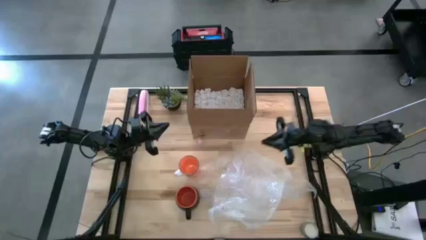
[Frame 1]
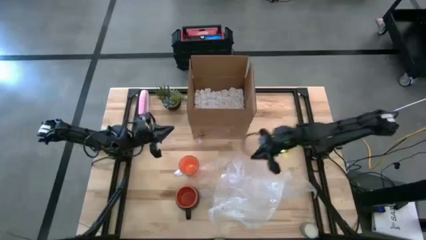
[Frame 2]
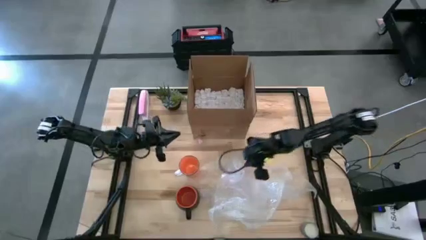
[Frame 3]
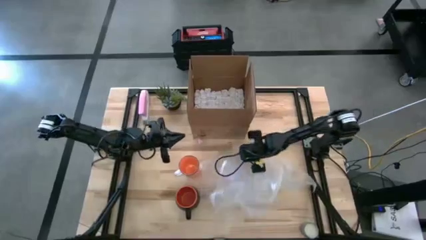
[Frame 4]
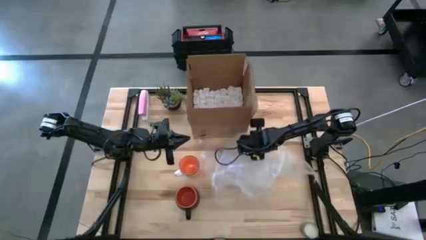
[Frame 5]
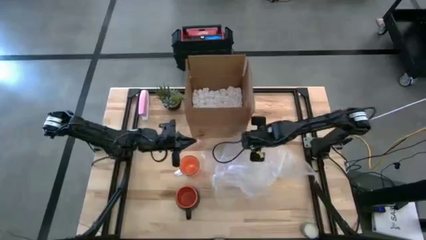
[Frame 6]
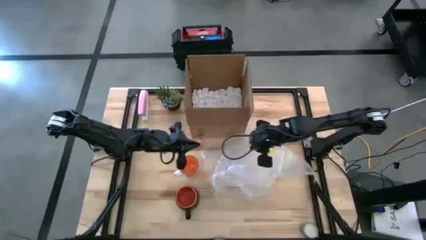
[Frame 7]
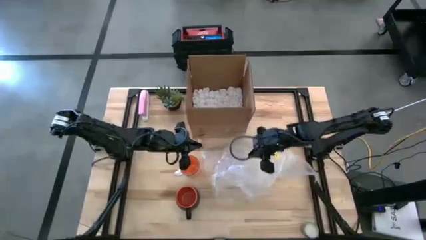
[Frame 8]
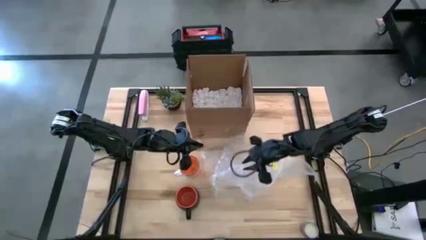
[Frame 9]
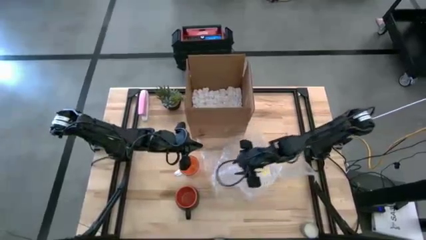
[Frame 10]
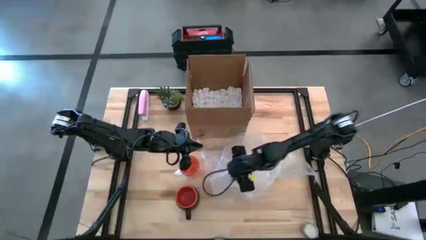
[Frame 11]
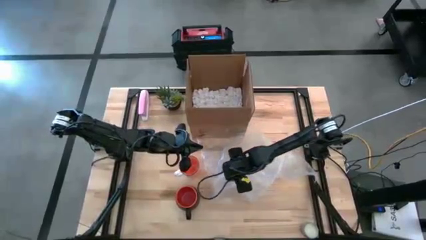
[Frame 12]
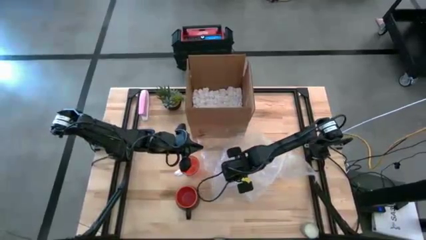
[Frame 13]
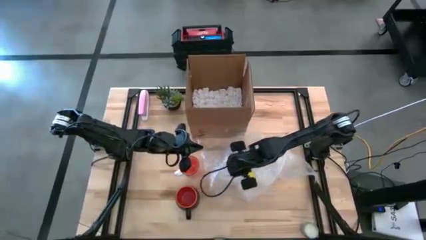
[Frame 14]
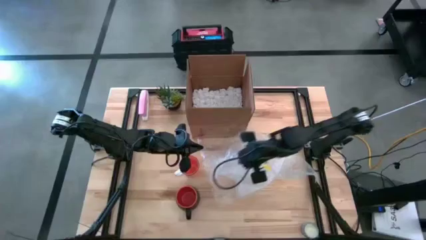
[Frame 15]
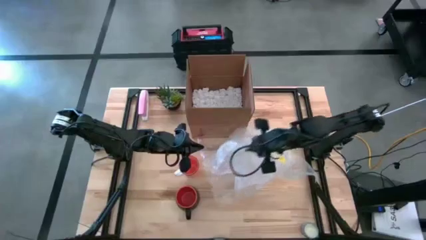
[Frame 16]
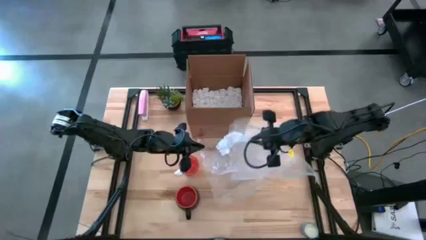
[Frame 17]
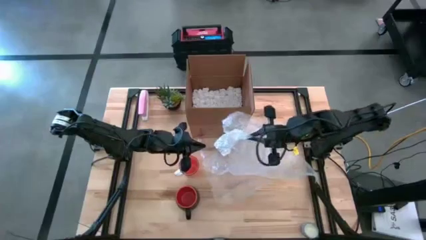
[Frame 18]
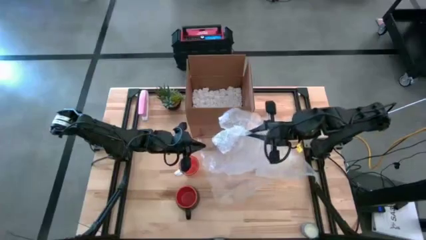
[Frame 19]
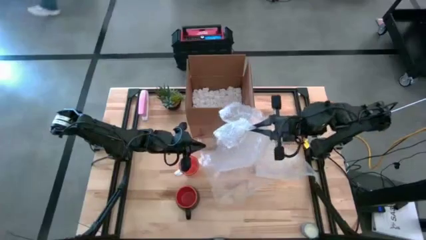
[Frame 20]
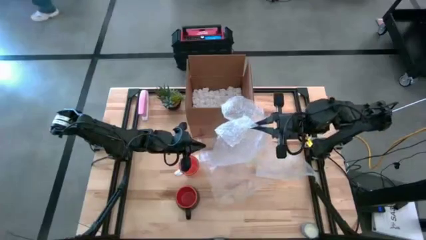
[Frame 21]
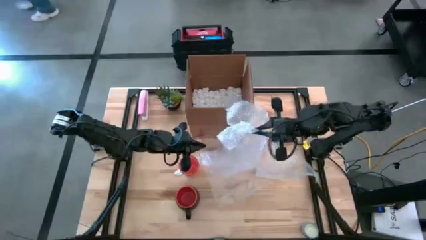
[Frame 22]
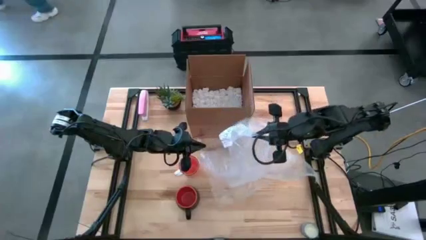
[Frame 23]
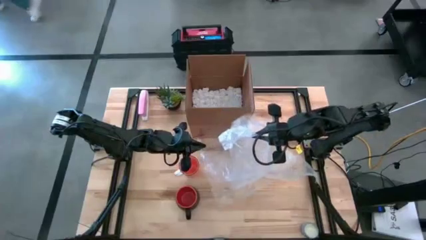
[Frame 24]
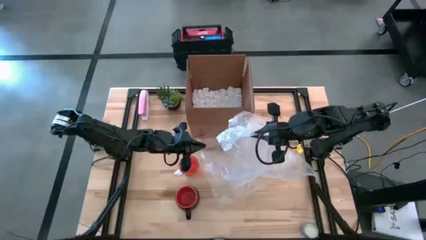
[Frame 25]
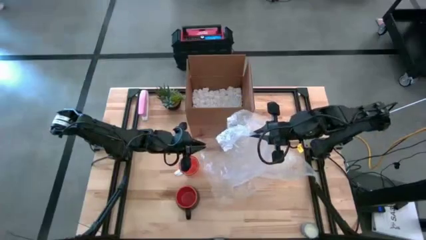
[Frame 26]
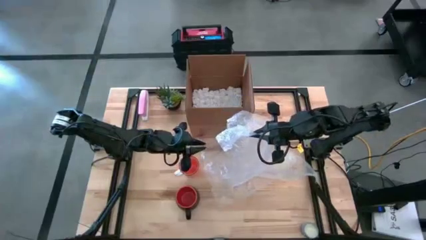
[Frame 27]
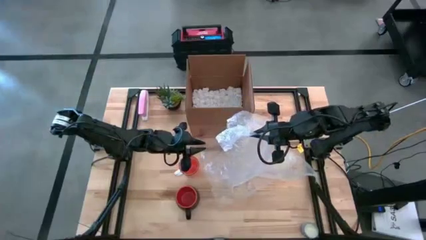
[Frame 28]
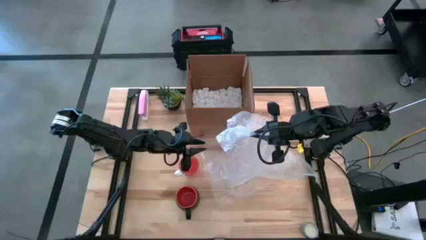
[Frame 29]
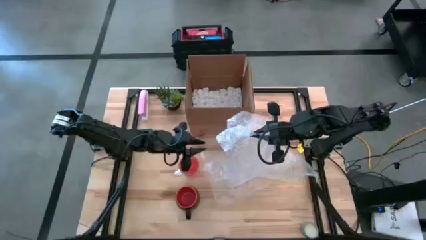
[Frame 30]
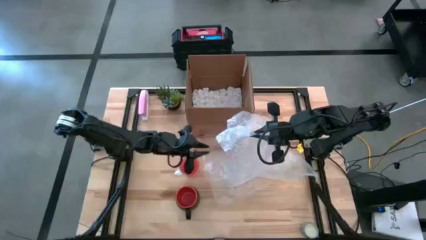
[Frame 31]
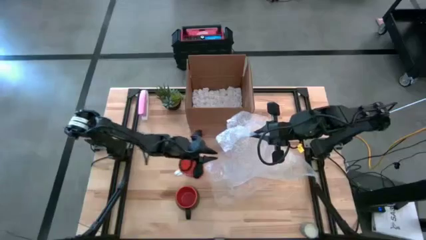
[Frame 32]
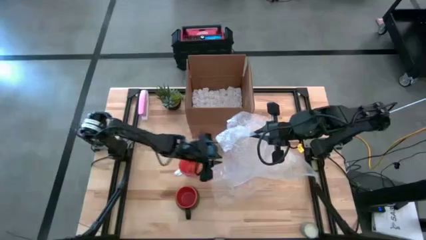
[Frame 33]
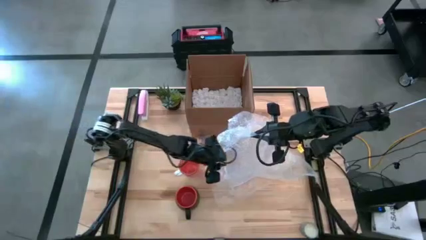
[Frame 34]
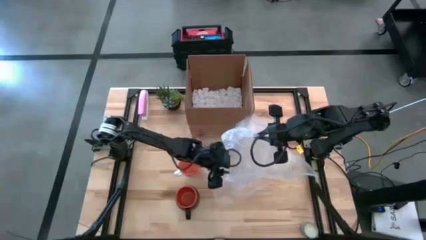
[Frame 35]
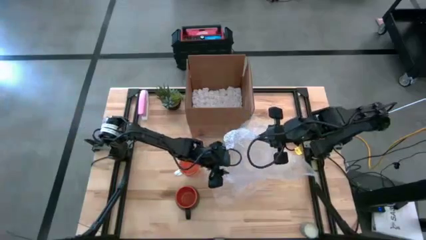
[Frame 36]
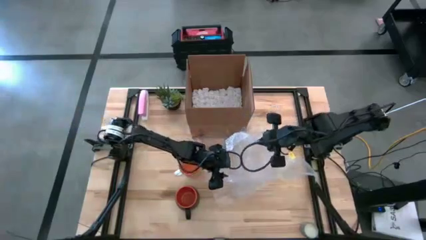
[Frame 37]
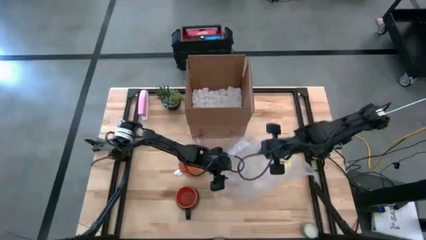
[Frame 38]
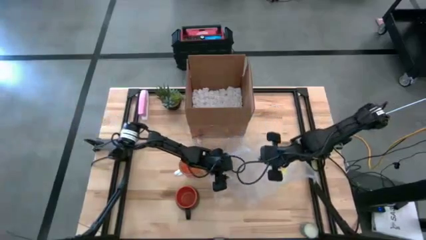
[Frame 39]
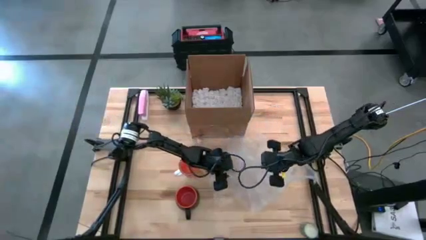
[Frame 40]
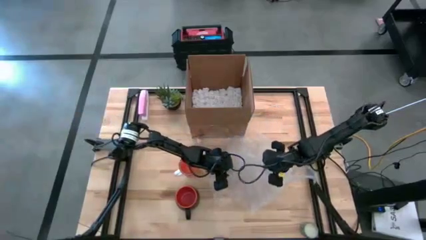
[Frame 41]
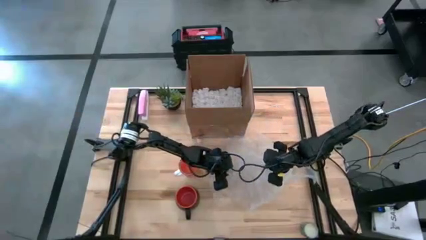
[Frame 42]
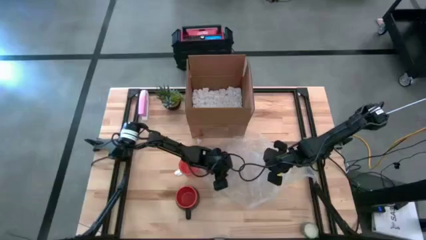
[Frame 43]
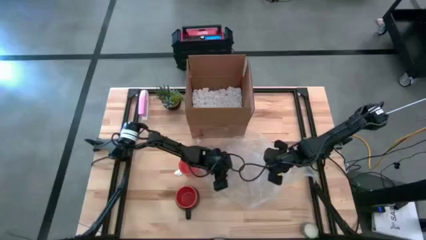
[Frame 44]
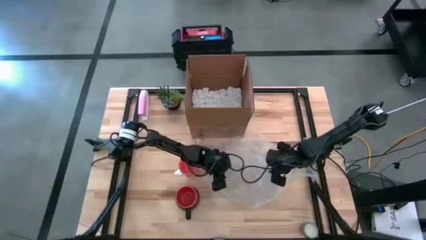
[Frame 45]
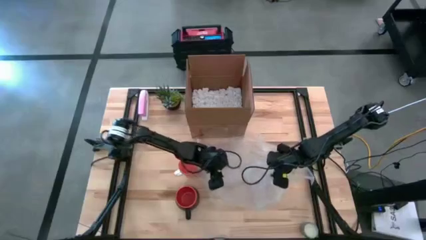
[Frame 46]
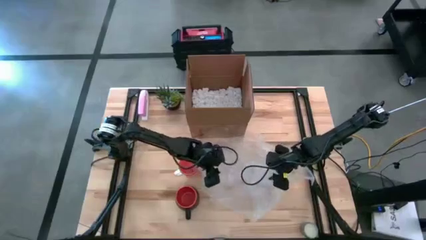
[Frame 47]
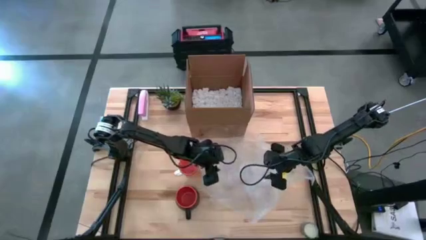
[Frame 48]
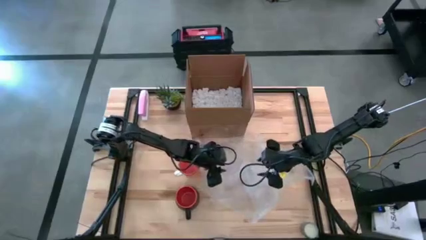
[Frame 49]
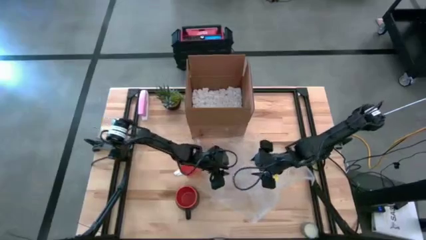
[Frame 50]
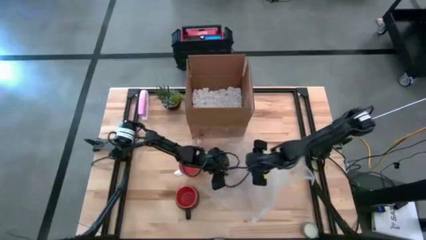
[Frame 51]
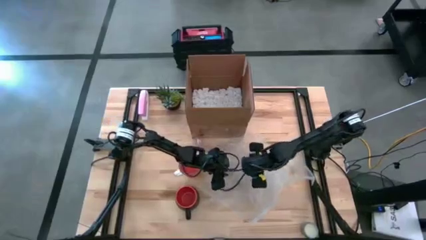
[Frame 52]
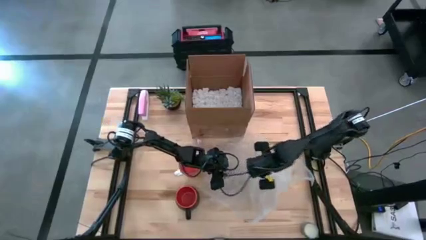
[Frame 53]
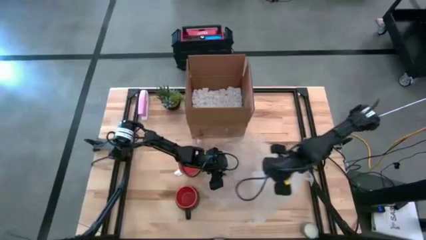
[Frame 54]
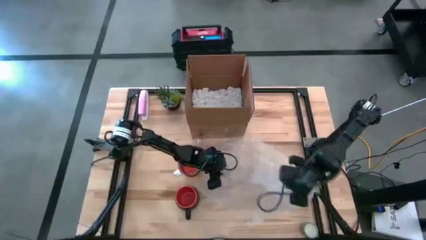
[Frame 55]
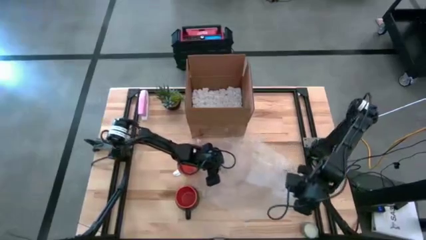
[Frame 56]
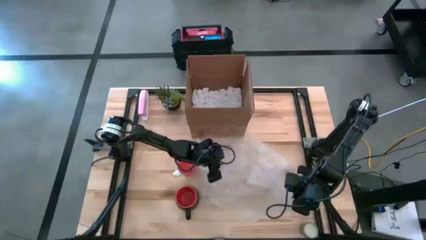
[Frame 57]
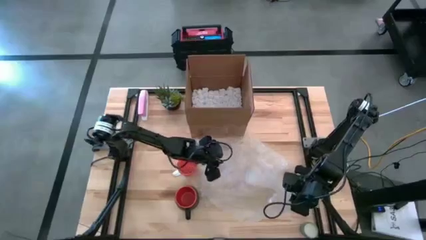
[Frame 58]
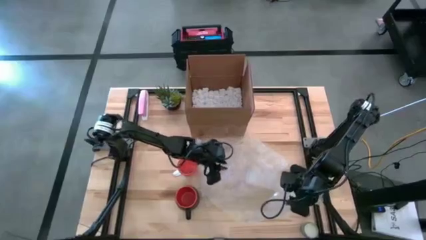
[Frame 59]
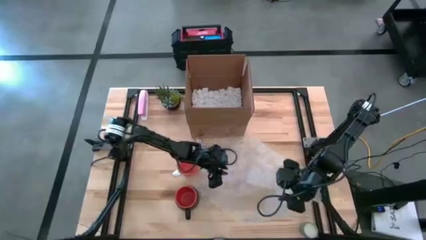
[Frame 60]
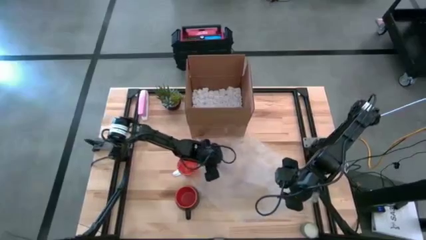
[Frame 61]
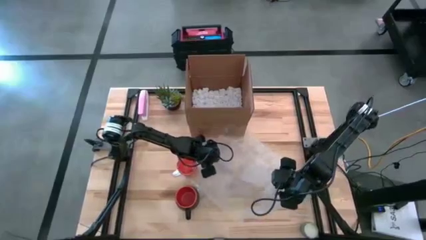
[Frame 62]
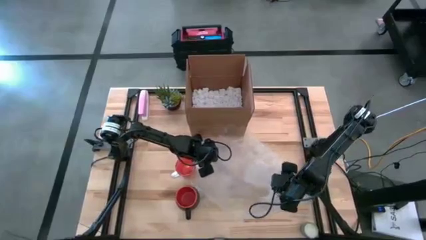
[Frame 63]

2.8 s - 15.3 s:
Task: wrap mug
Wrap the orange mug with the bubble wrap on top
